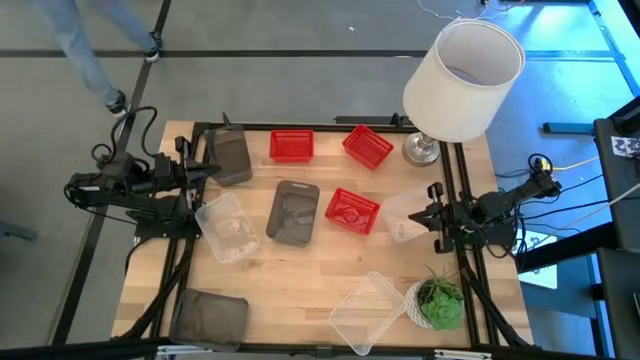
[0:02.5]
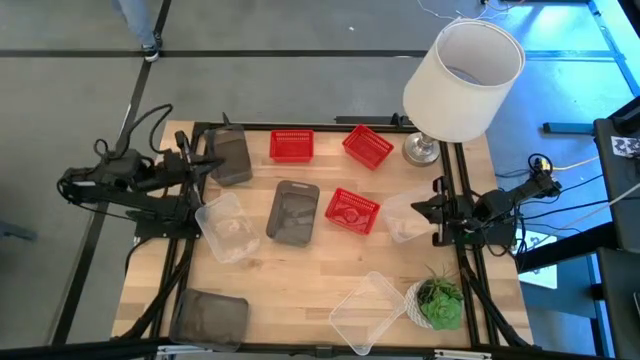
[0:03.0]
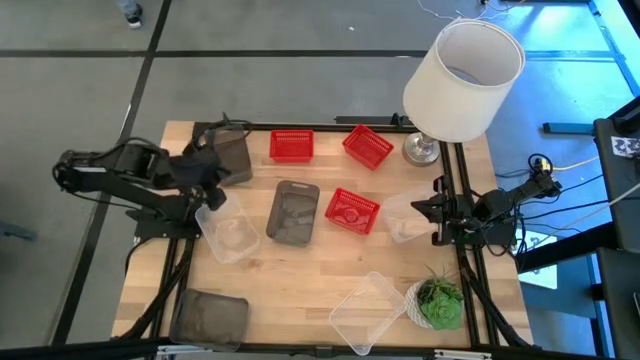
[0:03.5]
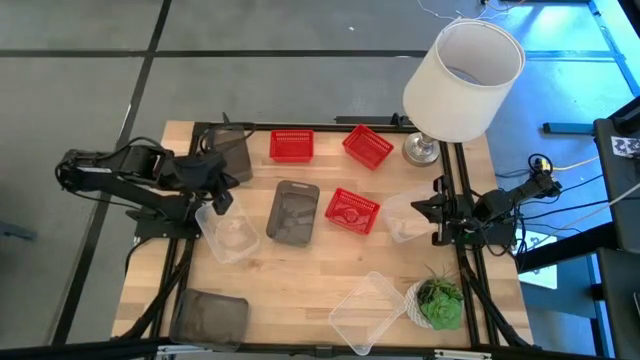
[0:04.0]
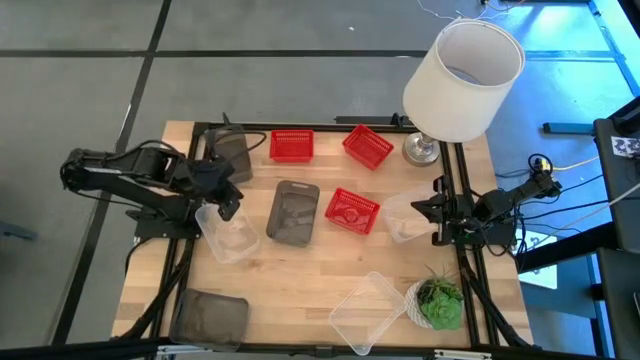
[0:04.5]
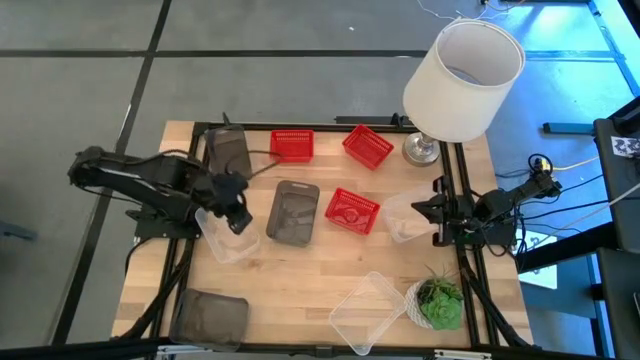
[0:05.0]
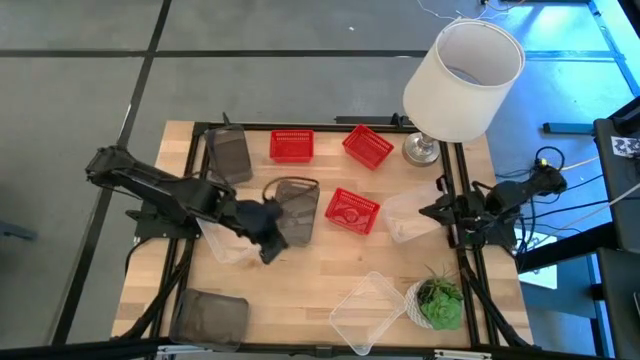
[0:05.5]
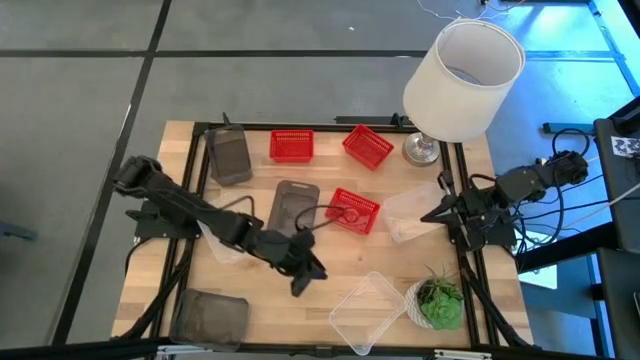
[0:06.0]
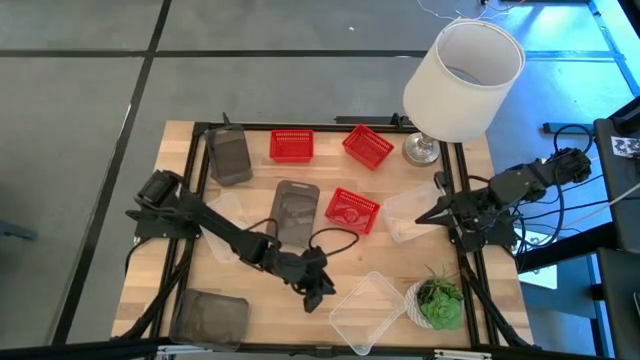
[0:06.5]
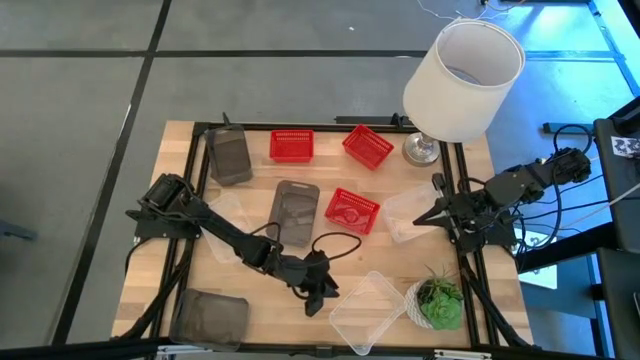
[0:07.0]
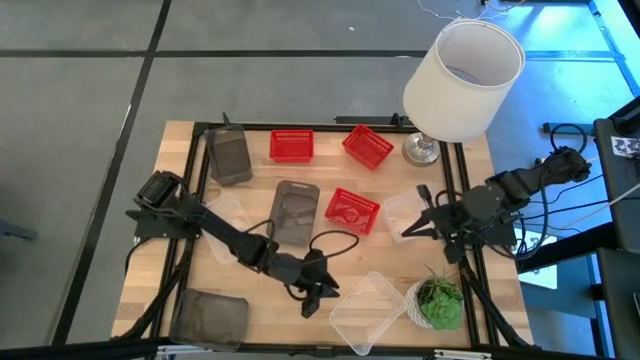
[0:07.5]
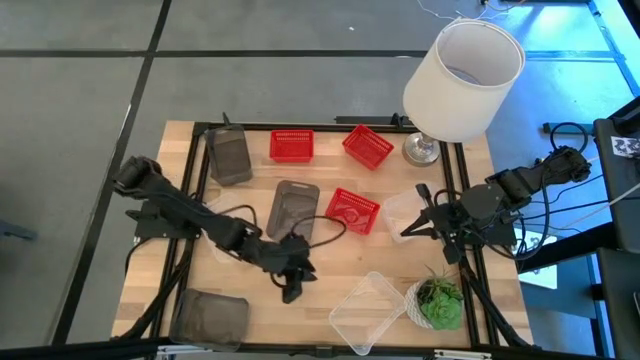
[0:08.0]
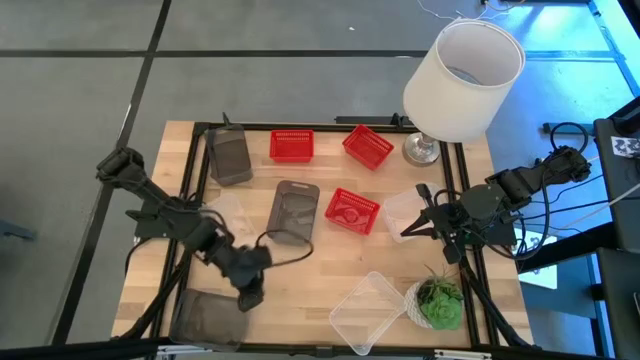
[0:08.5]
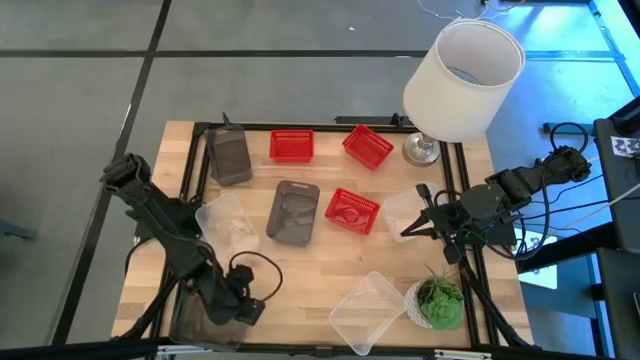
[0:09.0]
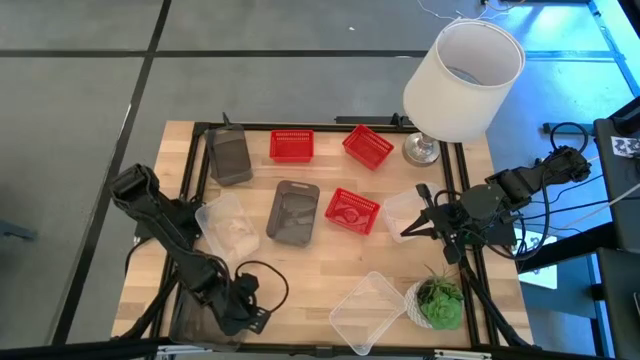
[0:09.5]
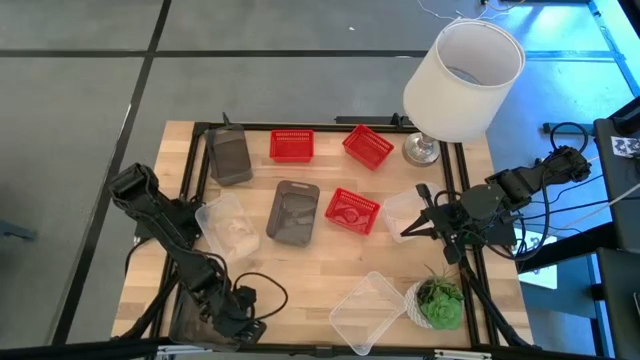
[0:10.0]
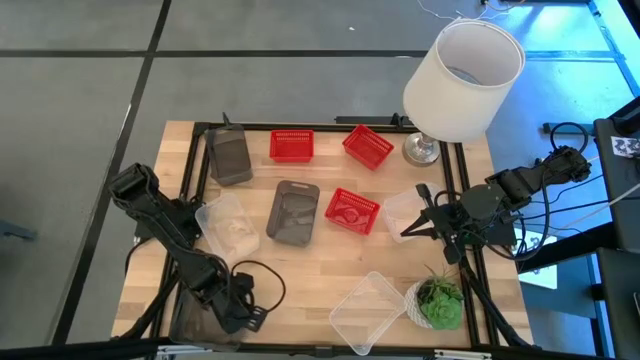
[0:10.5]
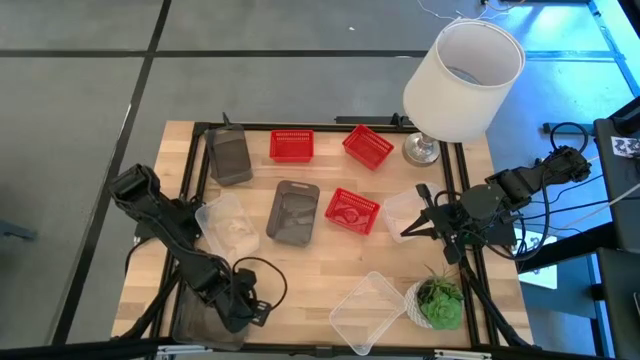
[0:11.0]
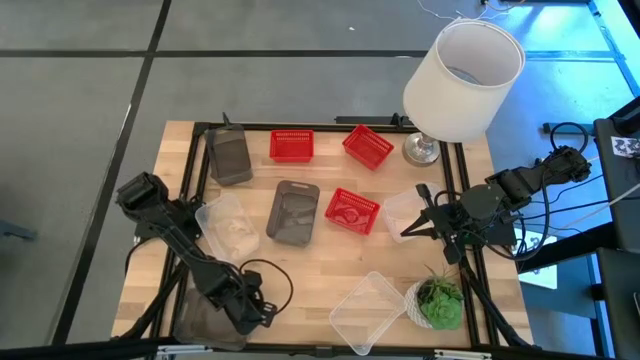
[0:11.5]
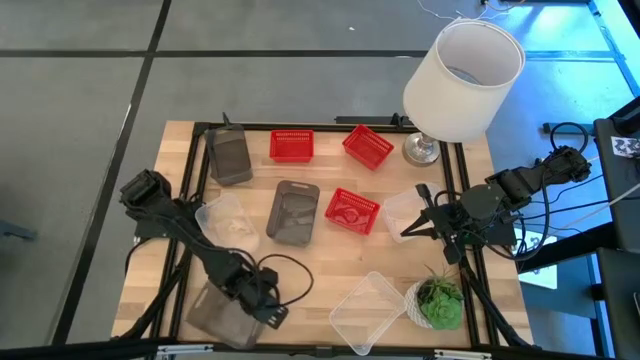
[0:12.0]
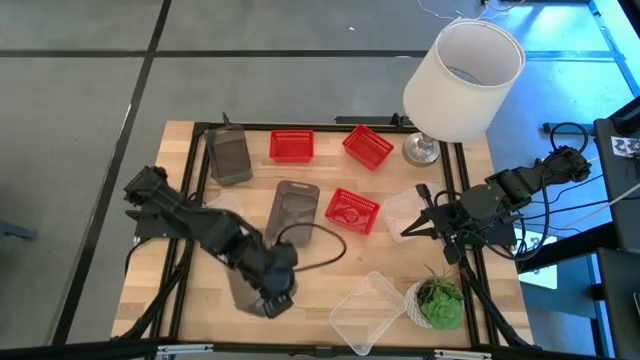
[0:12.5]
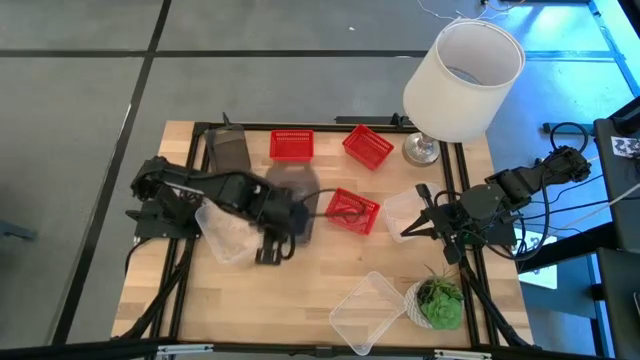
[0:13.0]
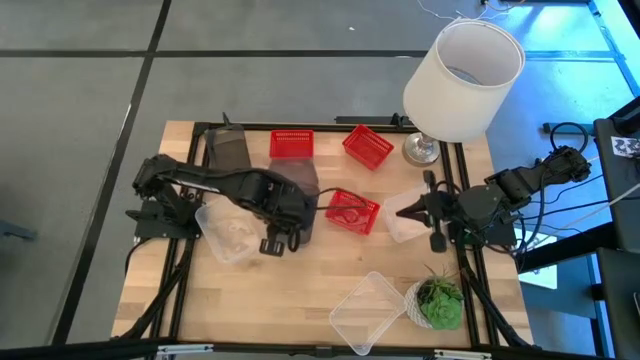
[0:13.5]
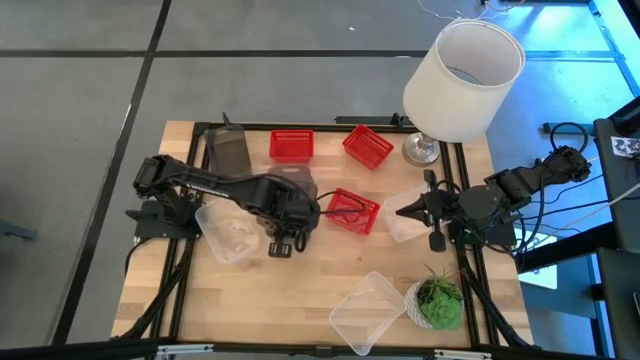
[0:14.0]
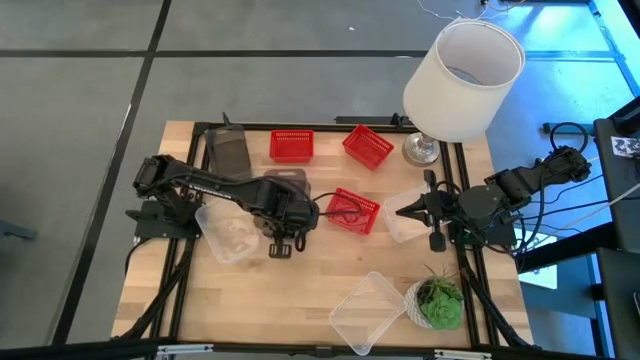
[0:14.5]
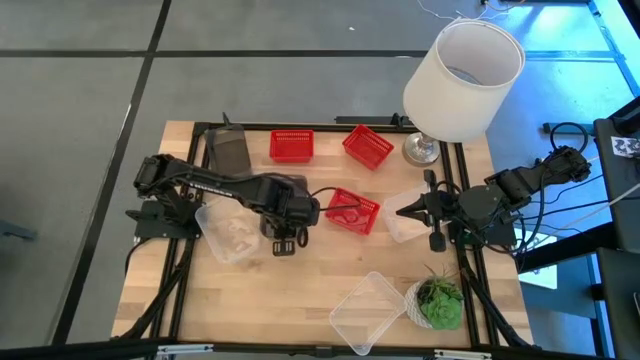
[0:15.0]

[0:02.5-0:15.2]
Stack the bottom black bin on the middle black bin

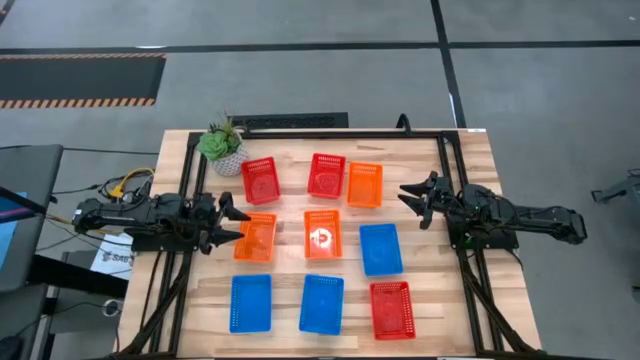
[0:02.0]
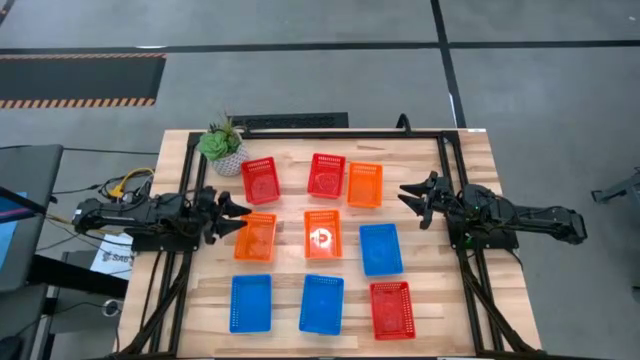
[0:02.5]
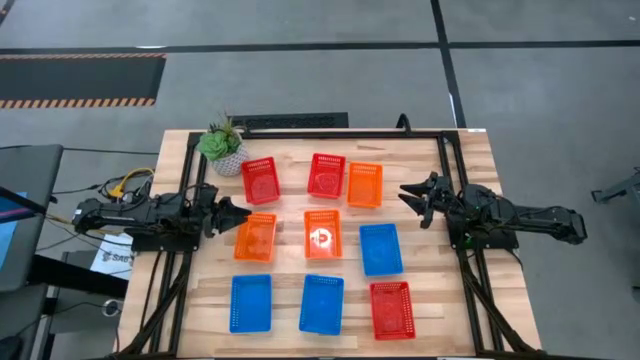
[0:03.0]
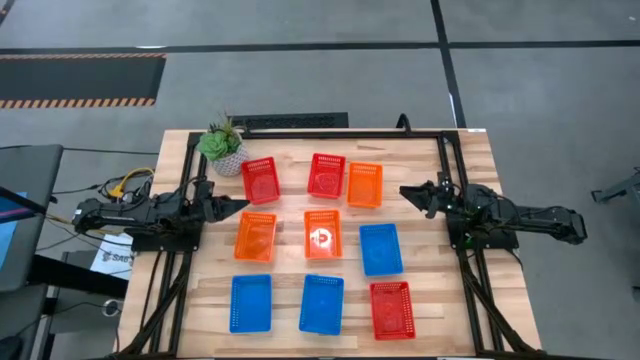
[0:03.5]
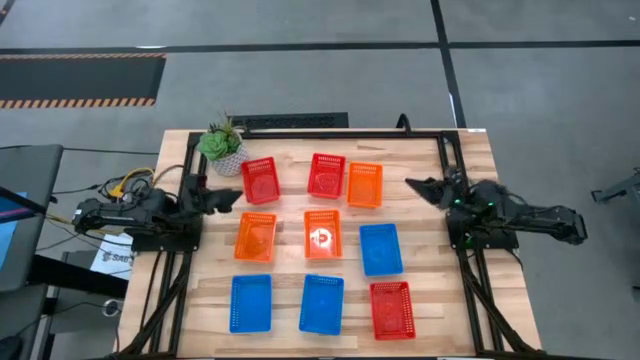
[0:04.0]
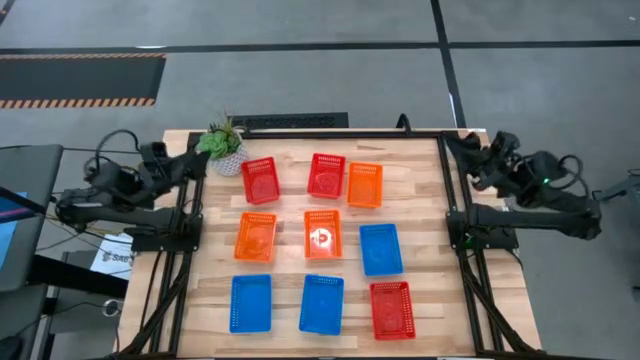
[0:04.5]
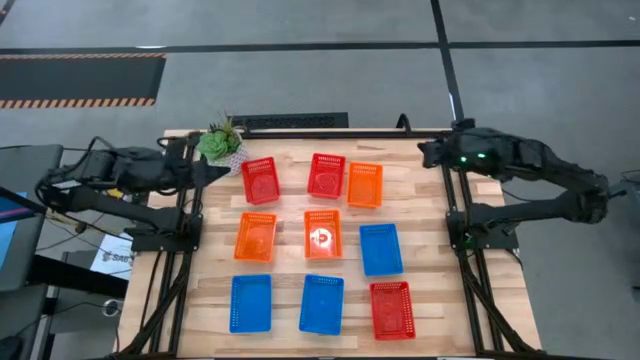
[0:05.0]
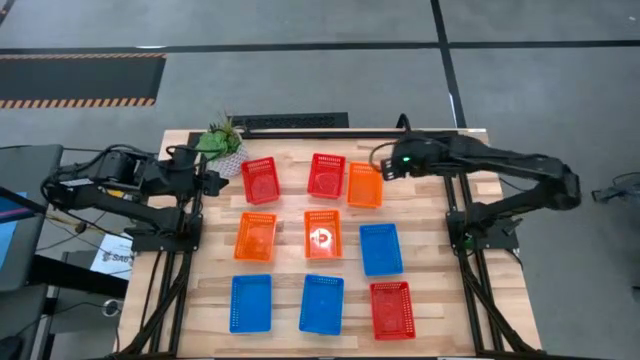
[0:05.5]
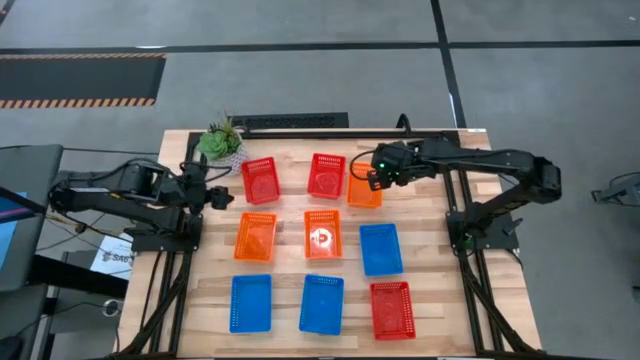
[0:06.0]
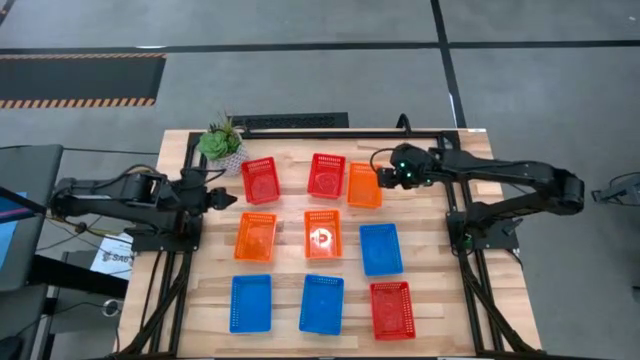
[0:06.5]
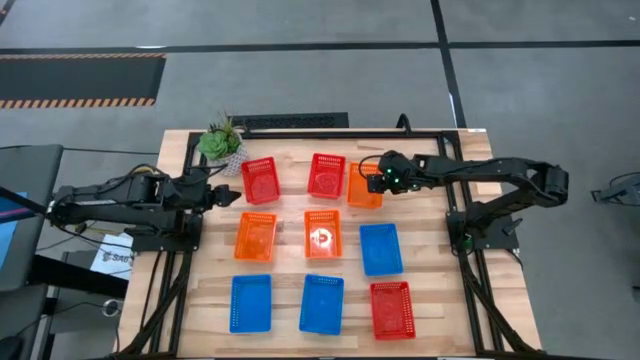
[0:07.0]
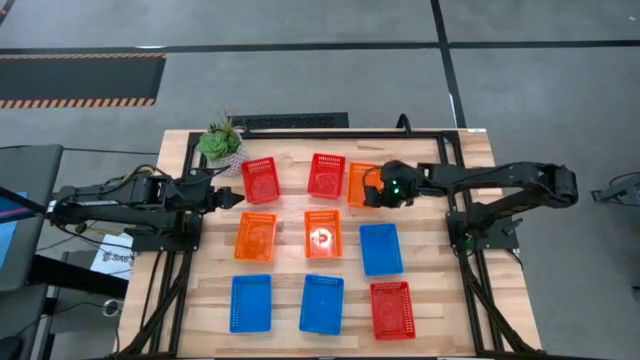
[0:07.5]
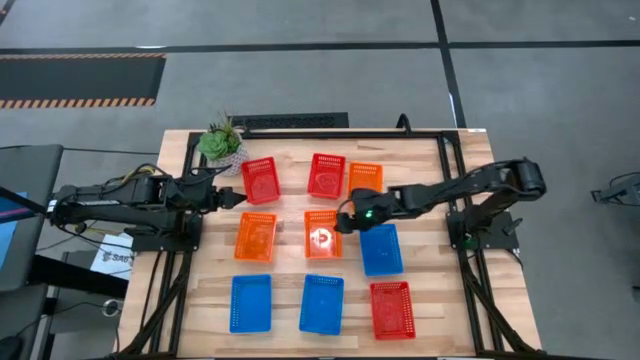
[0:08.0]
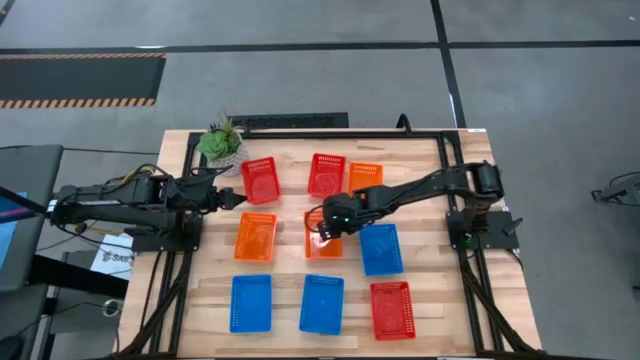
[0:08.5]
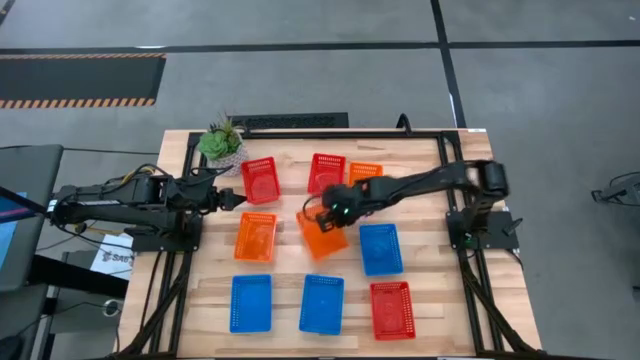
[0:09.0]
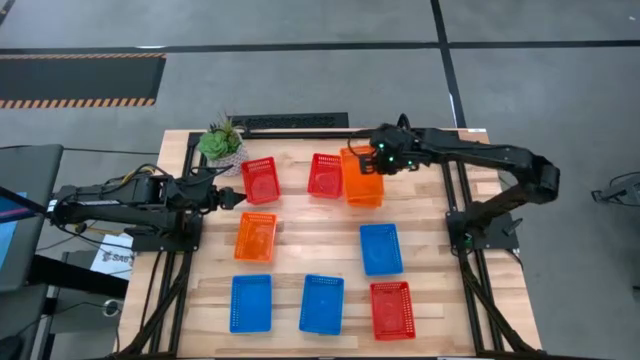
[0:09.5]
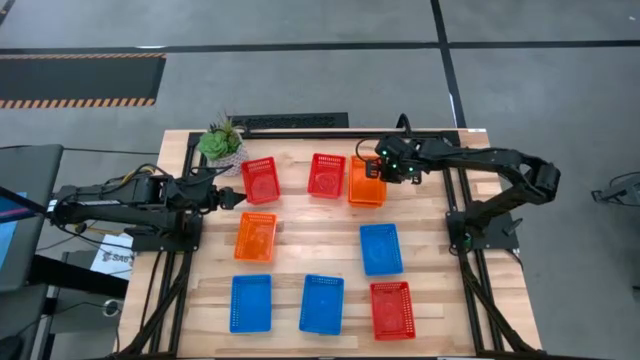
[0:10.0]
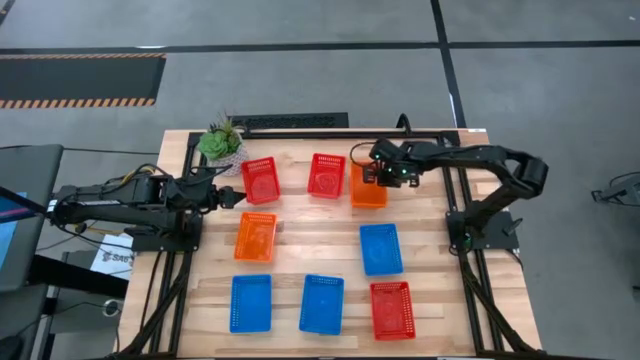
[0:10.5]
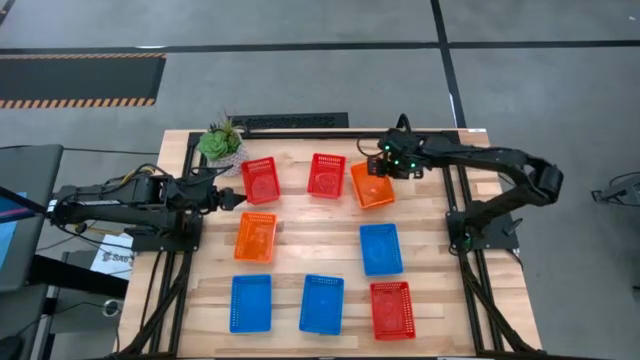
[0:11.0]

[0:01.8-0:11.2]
Stack the bottom right orange bin on top of the top orange bin
